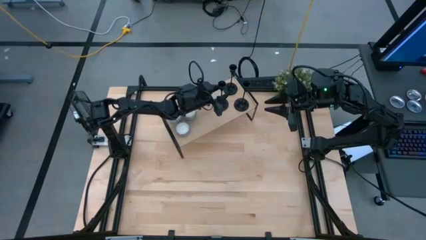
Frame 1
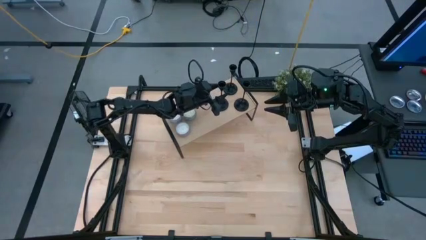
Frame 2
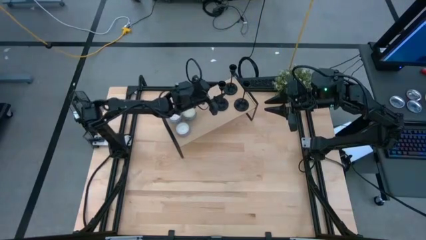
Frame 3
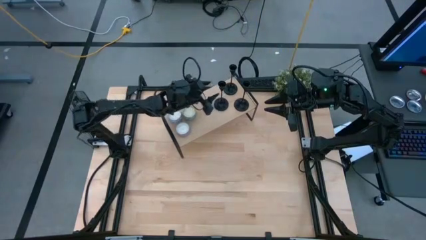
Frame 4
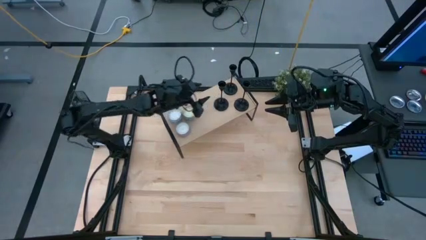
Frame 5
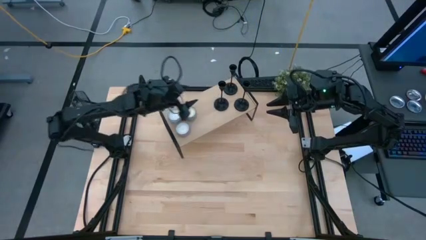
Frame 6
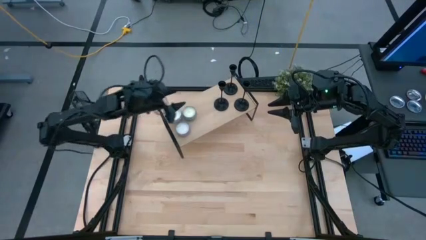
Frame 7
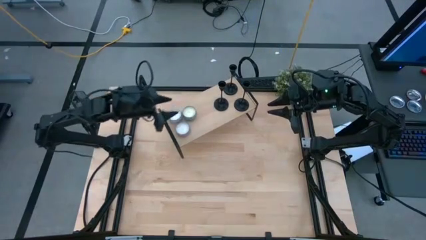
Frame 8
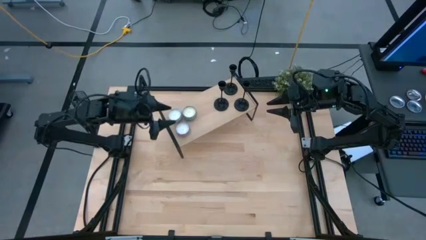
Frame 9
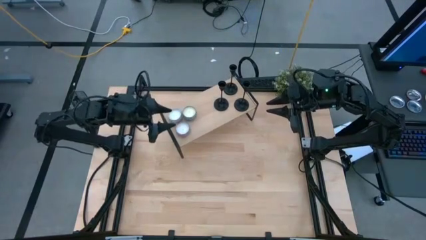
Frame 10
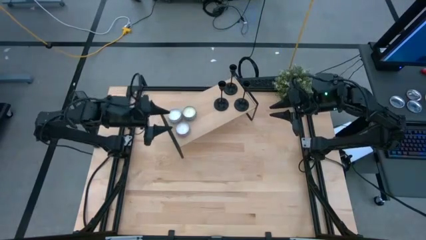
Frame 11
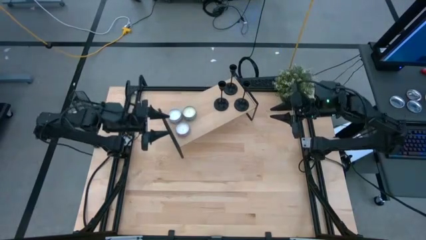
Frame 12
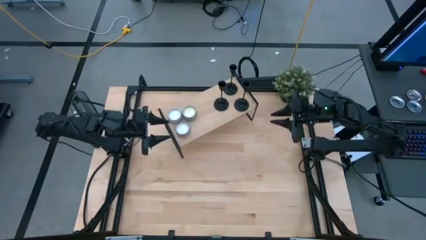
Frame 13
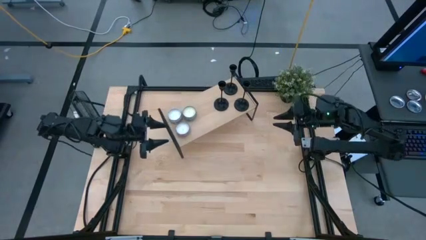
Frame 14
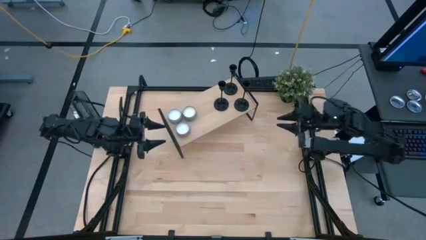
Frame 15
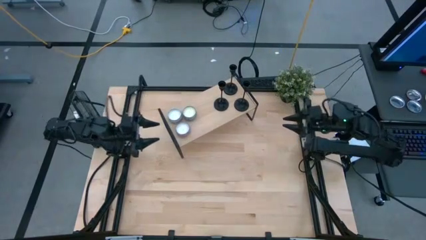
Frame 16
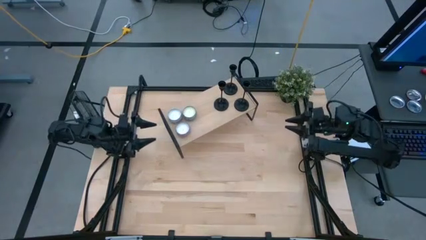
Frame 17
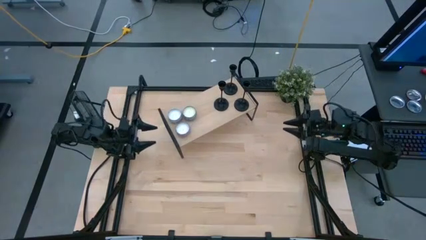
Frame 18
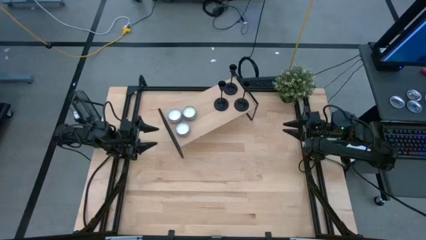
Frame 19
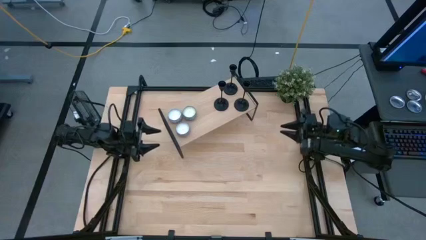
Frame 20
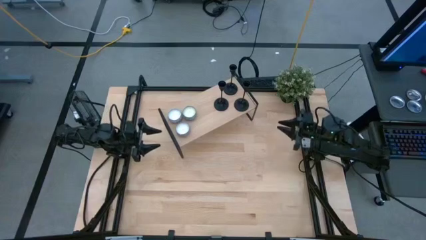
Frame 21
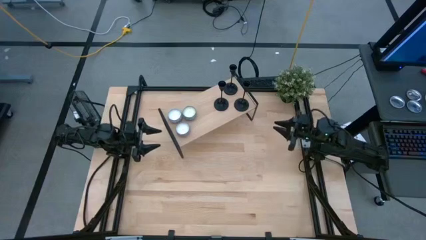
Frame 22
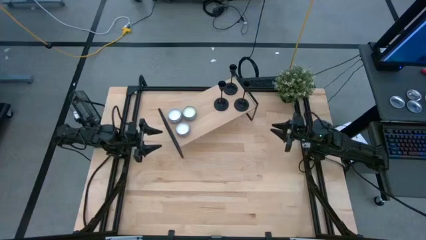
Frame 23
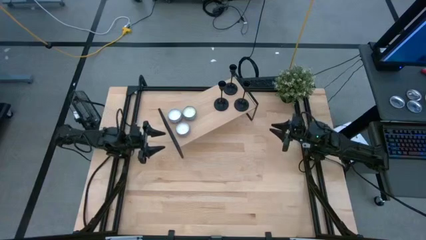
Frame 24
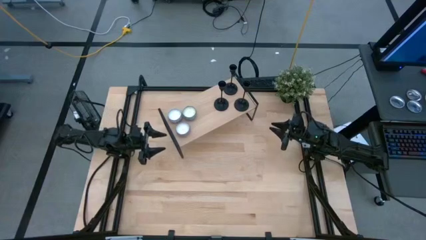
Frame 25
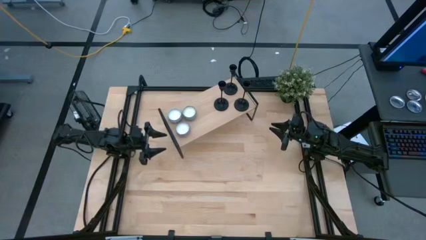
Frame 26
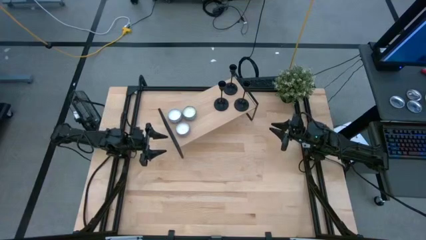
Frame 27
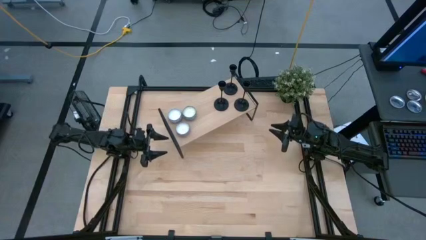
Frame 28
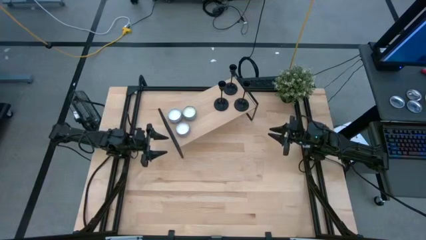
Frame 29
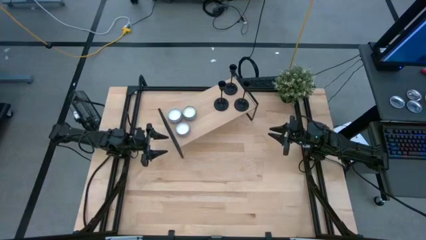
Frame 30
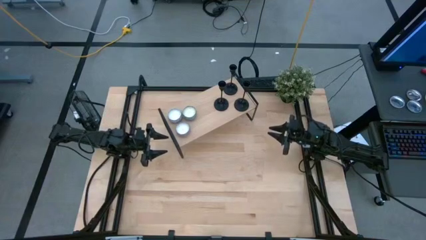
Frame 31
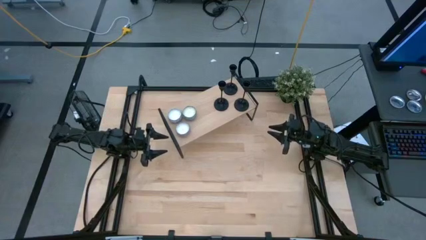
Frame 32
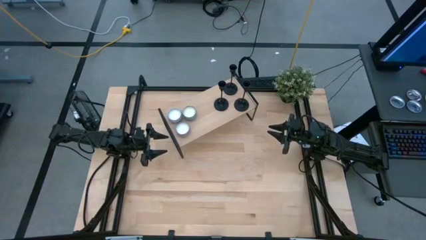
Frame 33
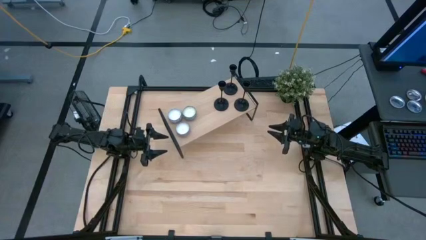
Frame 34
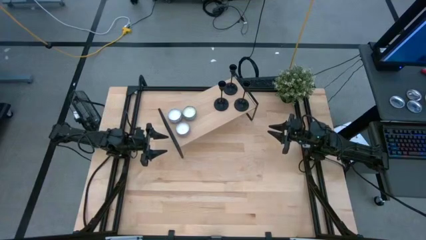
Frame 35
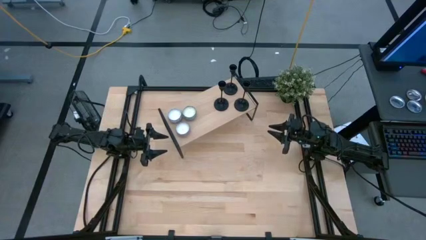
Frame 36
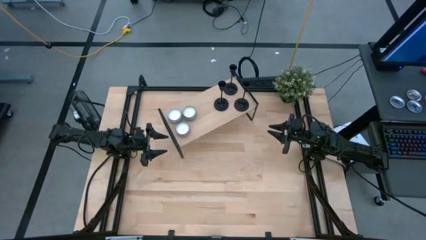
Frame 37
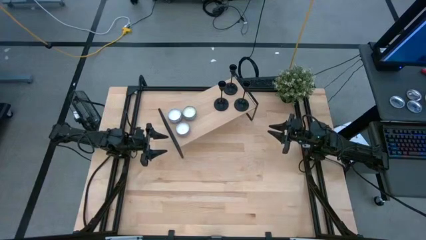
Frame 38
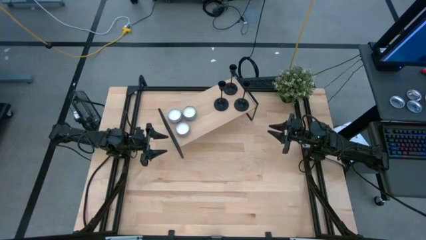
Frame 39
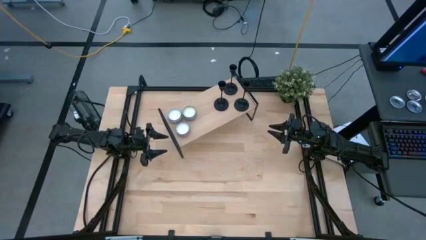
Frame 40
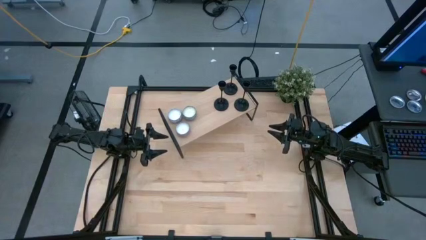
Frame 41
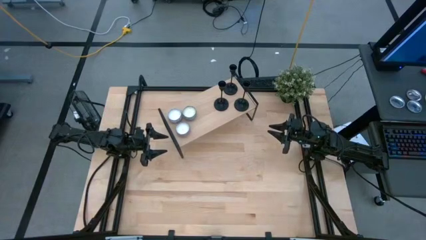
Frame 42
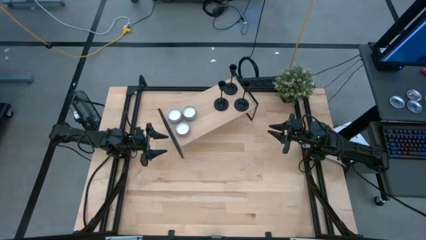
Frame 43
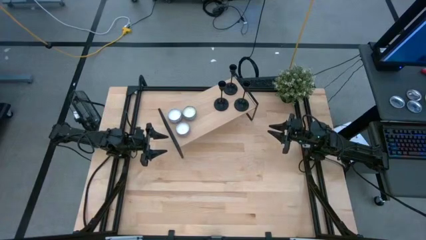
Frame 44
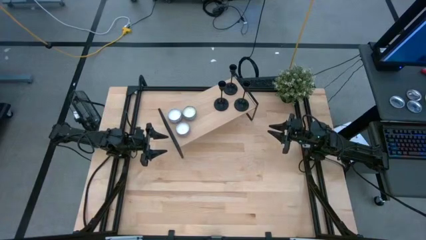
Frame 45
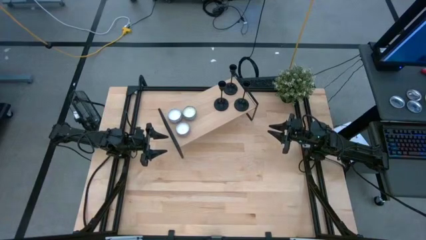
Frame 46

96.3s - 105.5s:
Task: Pick & Place candle stick holders
Return to Home Position

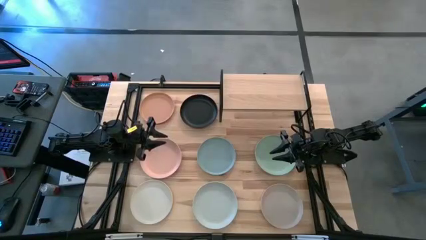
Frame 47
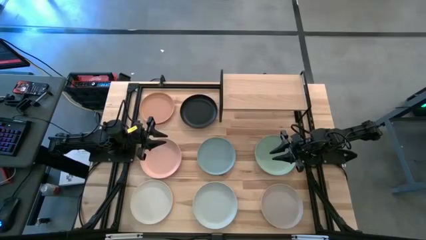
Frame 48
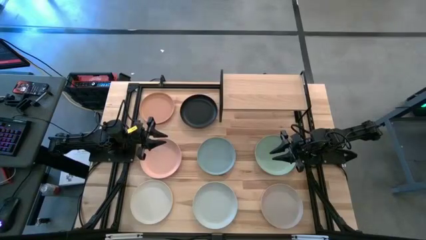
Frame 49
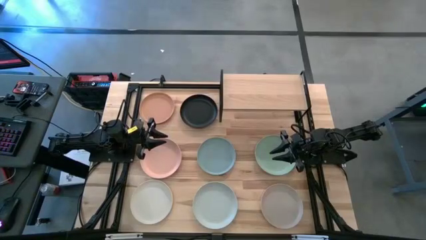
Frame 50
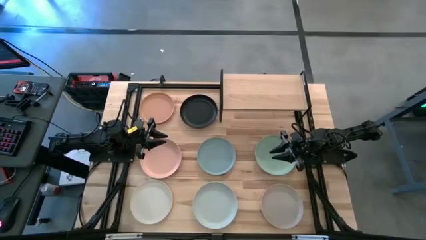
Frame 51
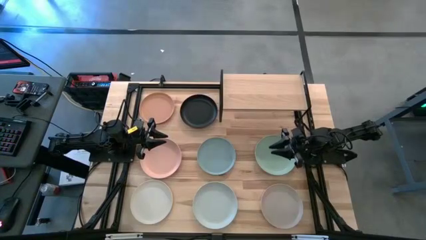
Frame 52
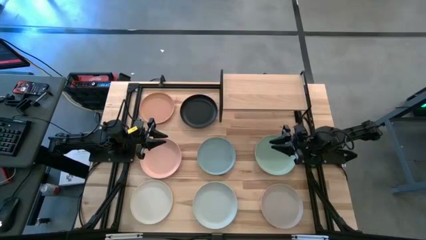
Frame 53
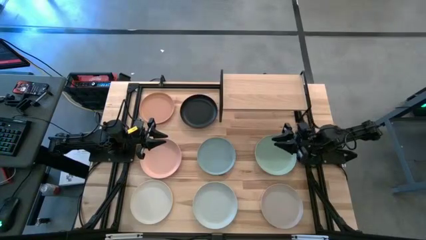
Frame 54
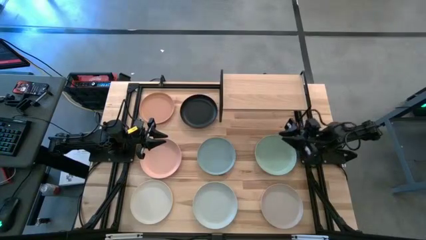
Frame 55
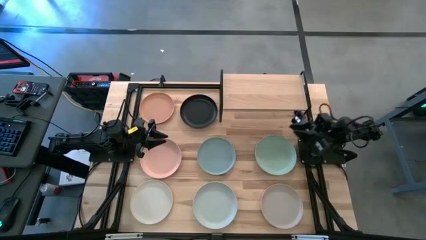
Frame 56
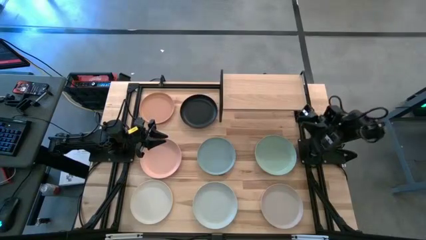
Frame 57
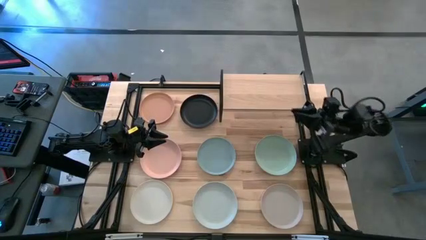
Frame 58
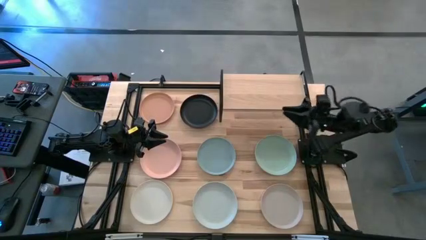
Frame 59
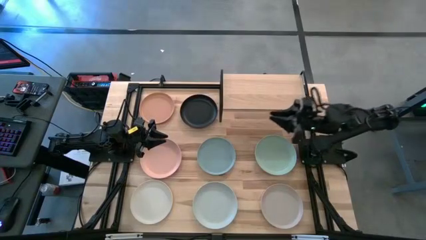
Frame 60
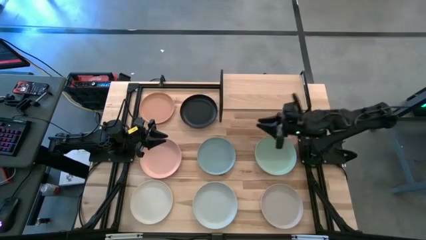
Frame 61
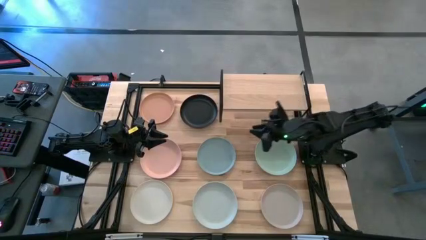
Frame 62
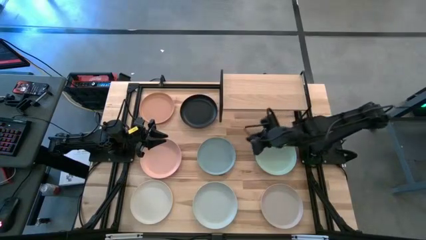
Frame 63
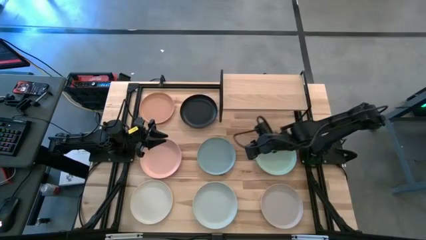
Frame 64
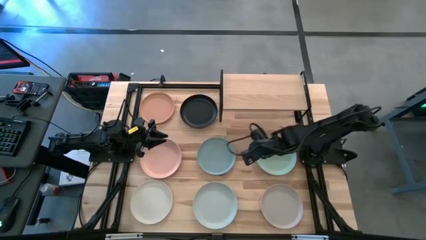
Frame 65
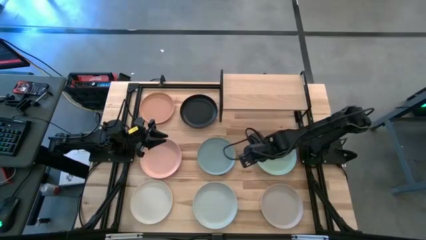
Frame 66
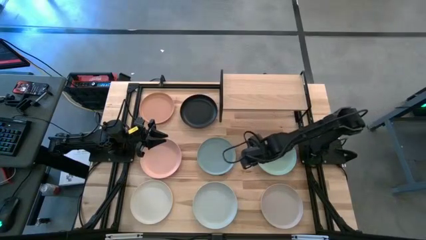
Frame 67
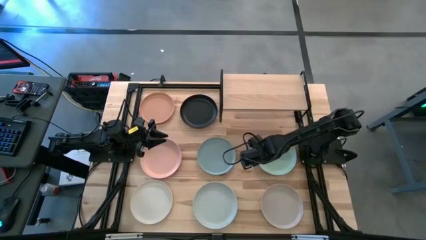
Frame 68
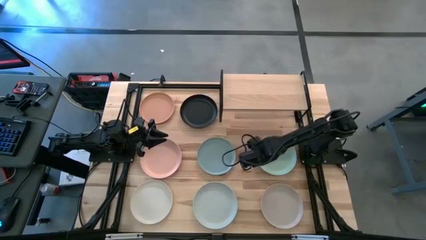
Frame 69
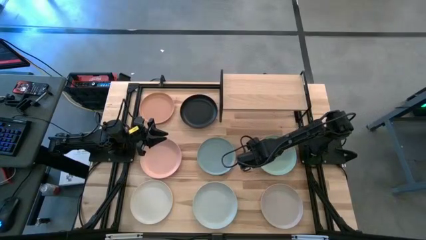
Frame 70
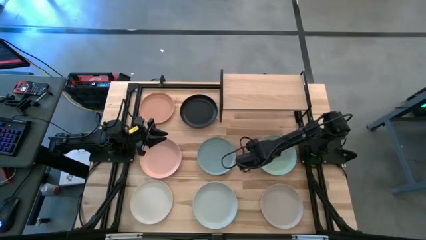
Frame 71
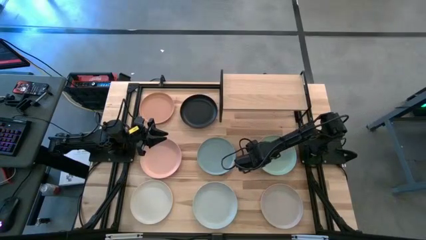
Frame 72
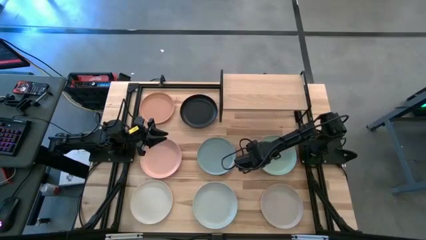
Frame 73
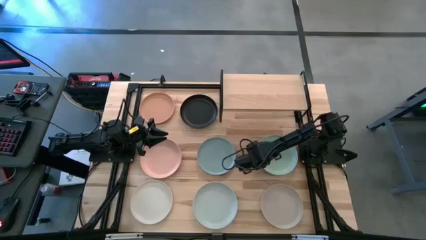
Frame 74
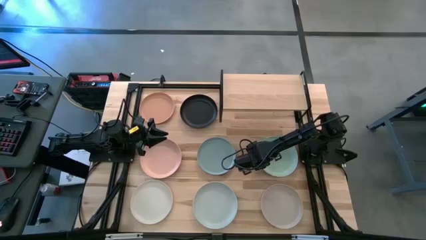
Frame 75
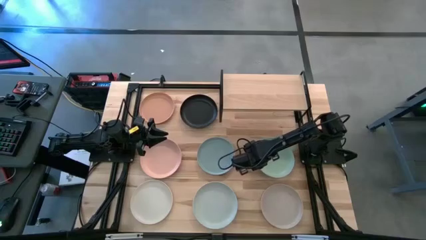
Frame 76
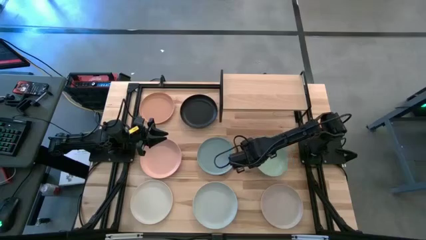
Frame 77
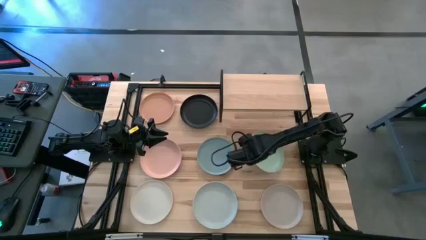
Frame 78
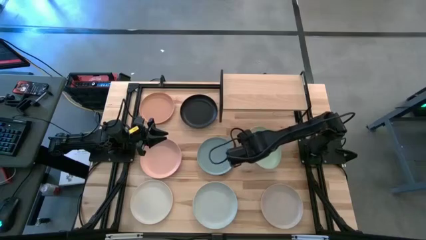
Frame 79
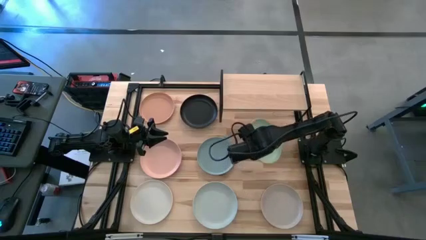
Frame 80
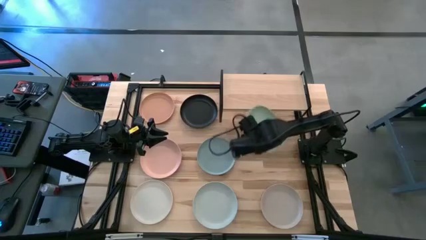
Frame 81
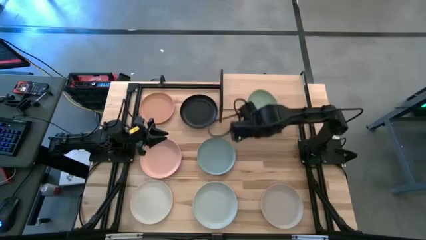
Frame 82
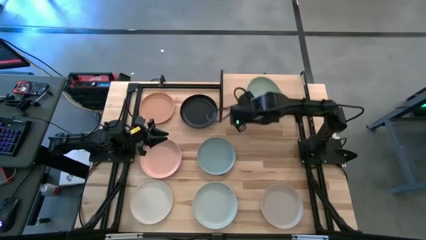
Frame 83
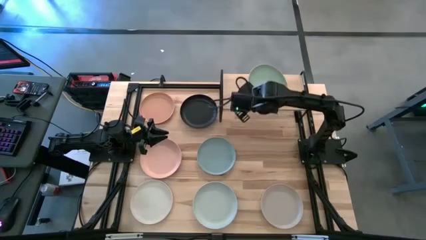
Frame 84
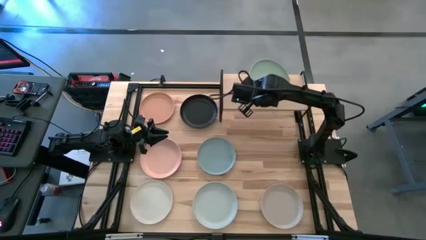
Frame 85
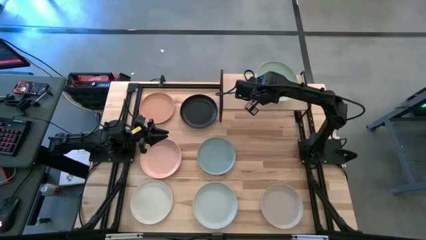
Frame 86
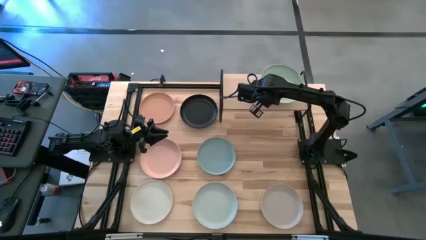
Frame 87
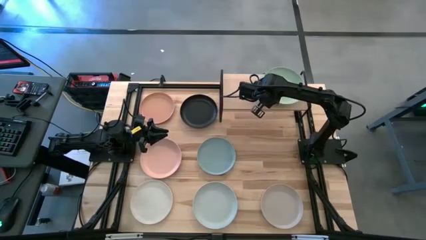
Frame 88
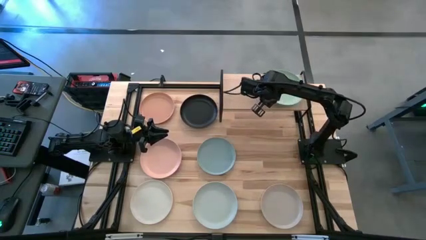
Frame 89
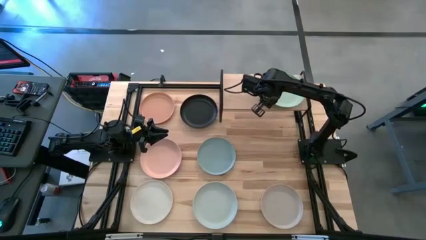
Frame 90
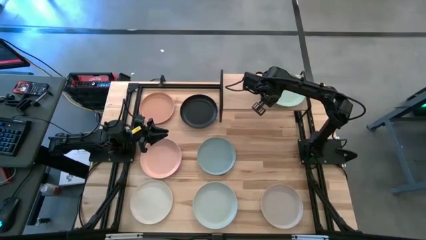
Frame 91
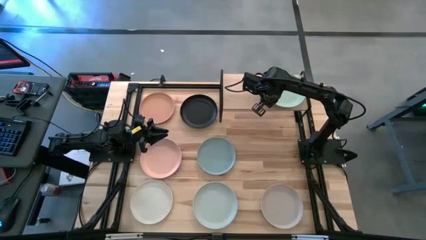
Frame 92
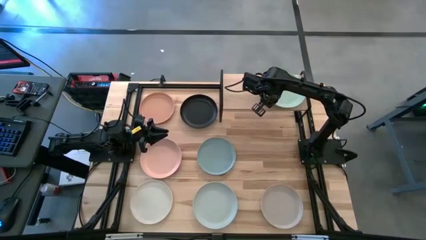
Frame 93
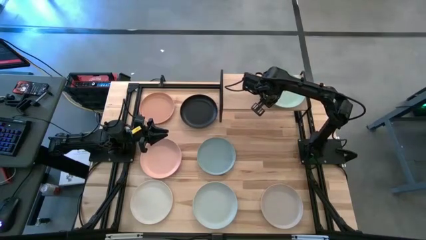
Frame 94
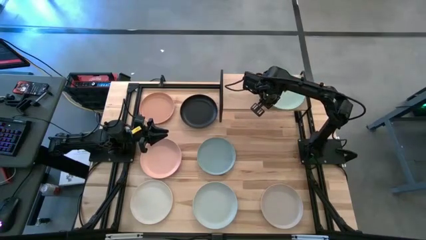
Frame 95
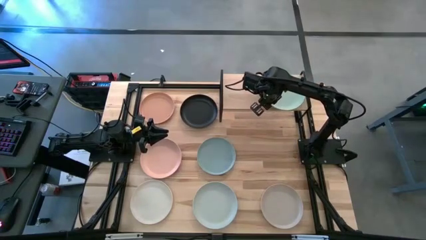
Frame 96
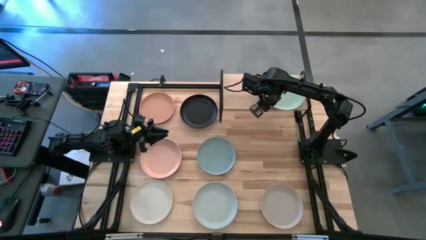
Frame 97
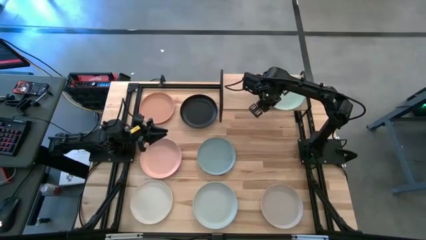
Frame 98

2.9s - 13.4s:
Task: Place and stack plates onto a shelf
Put the light green plate on the shelf
